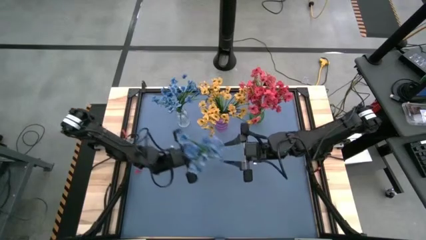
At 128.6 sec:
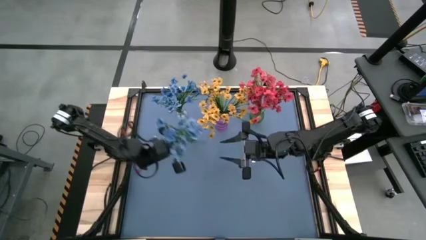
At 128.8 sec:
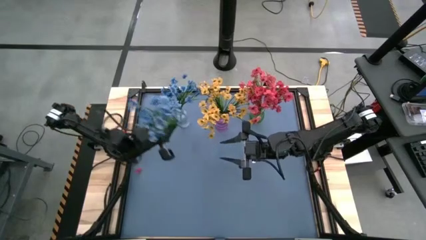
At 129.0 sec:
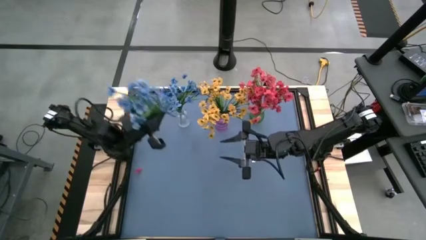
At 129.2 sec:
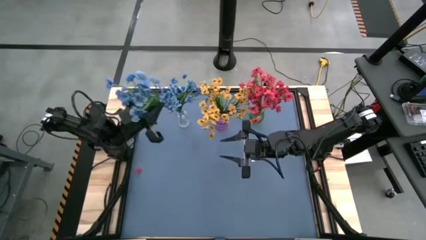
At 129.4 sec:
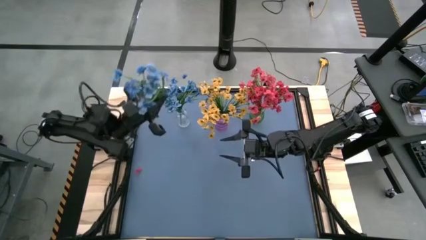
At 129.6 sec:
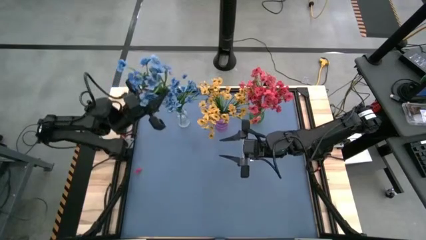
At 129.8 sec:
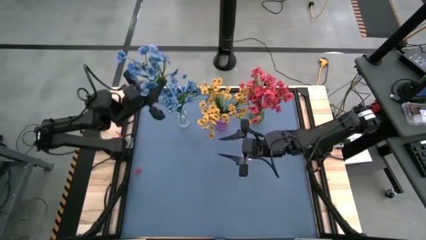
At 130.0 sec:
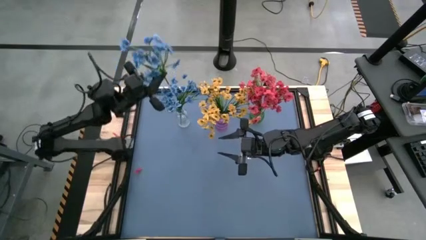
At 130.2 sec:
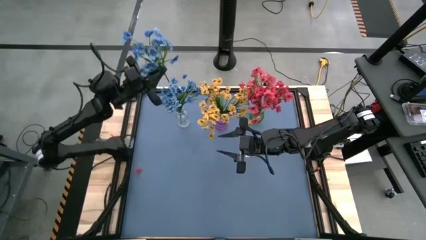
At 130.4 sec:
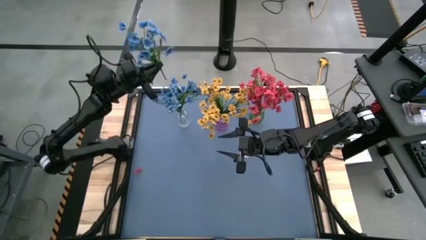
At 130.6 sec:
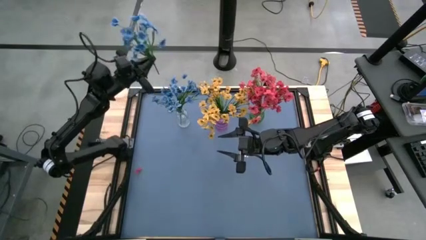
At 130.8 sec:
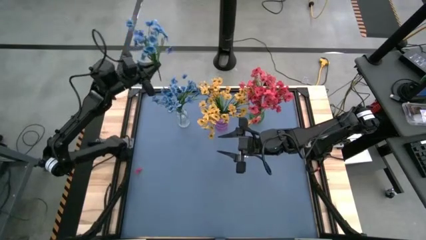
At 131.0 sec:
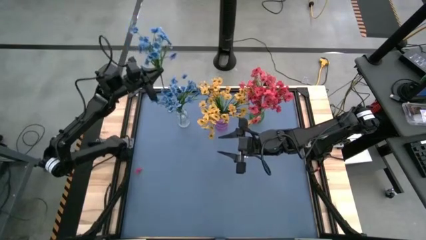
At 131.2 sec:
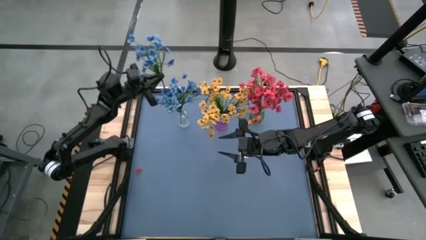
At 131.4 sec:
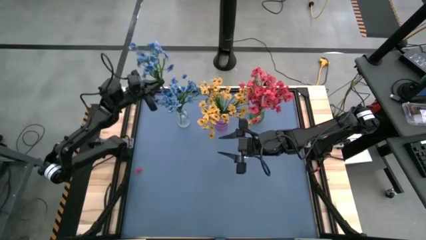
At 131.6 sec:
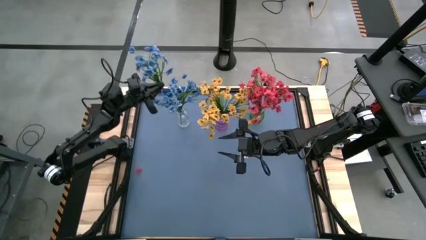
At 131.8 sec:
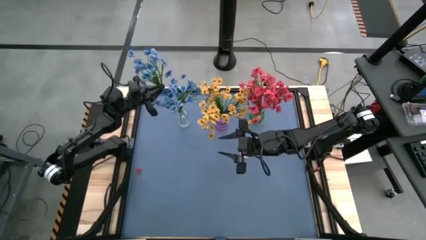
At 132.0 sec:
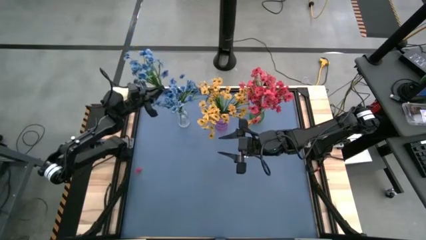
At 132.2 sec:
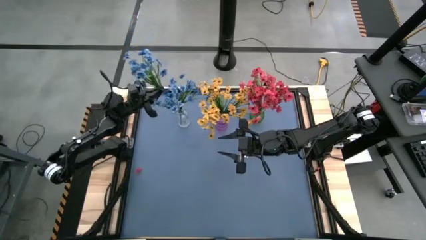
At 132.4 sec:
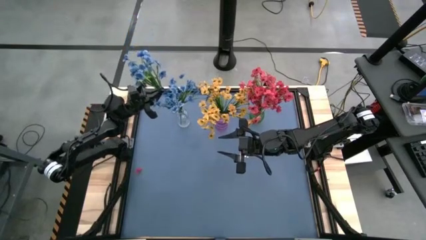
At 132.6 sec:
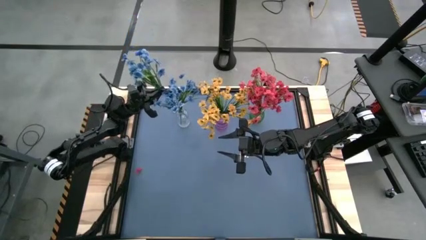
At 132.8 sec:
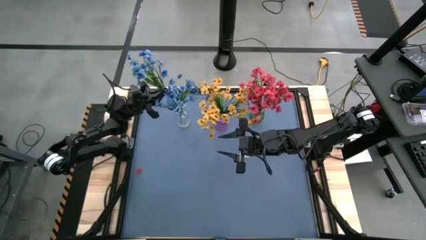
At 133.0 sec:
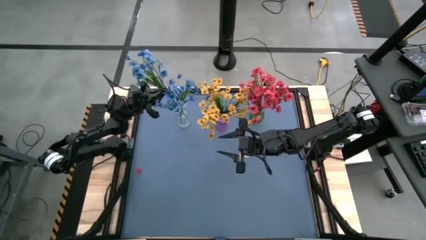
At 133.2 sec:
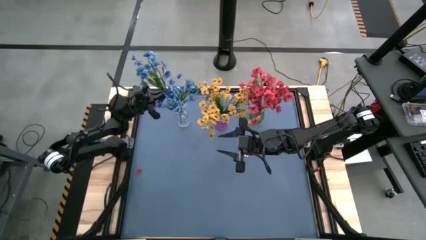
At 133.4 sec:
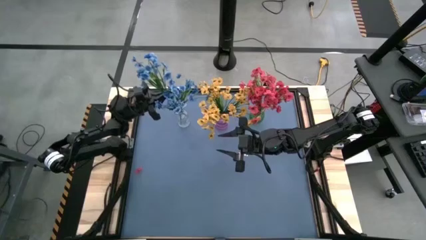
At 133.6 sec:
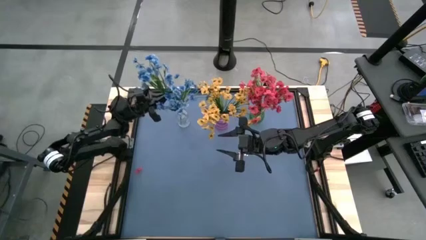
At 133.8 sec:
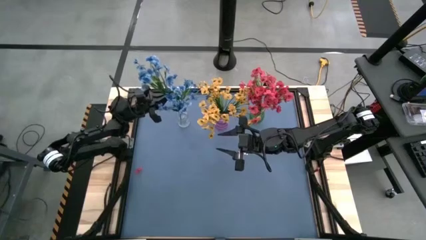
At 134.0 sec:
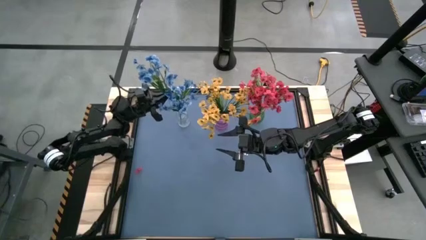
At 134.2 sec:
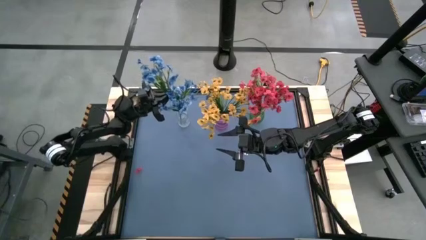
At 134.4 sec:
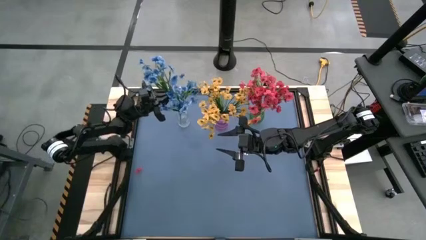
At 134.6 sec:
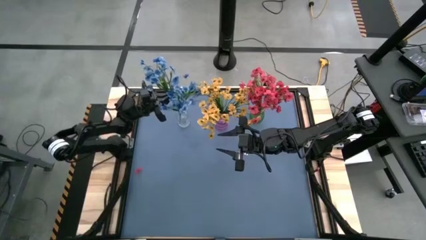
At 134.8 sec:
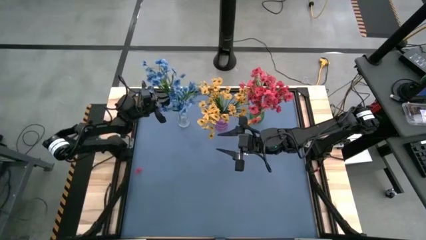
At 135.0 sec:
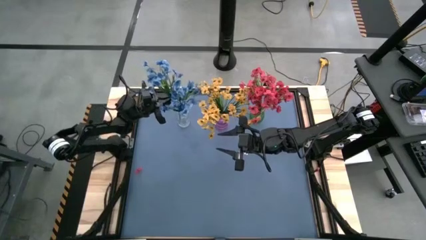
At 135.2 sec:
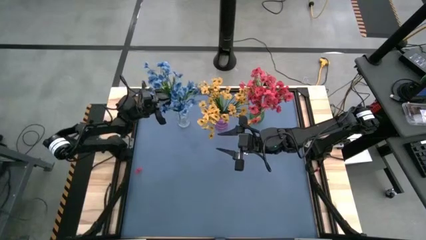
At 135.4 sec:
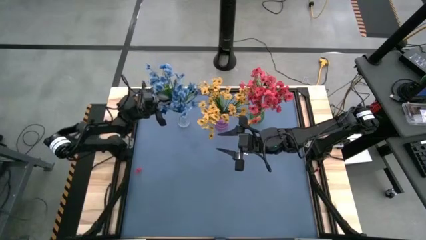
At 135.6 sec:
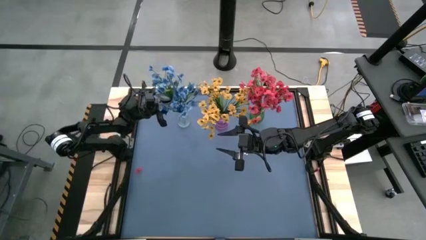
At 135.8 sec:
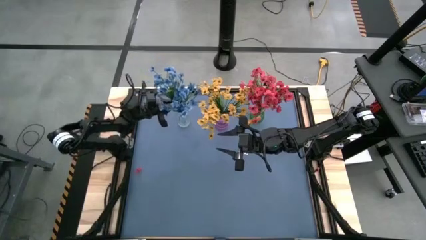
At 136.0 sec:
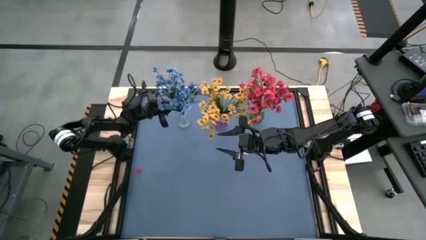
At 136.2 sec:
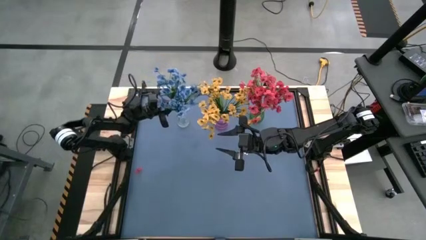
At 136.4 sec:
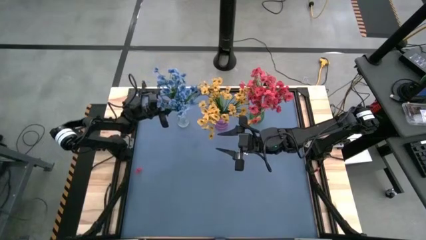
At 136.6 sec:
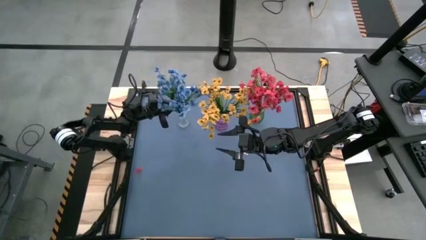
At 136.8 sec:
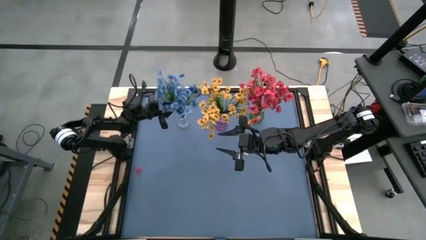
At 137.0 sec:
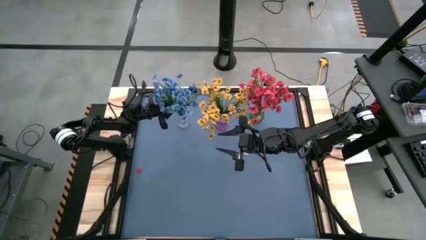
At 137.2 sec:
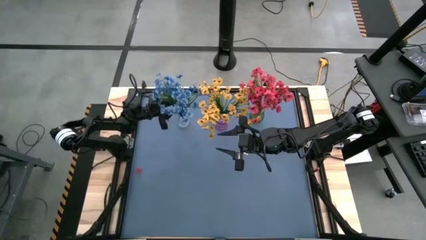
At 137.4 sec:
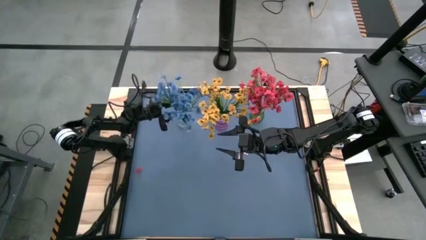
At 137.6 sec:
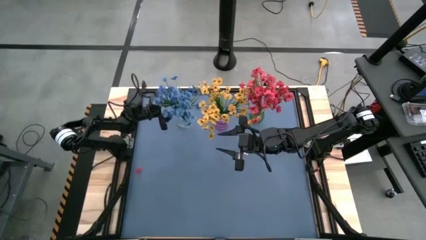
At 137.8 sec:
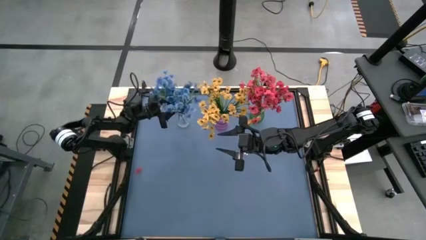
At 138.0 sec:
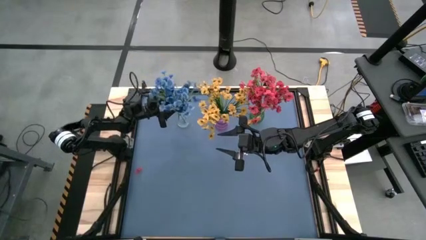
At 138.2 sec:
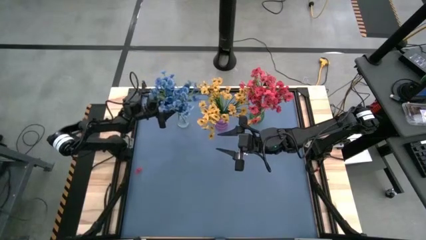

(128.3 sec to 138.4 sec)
Task: Sort flowers into vase by color
Put the blue flowers into the transparent vase

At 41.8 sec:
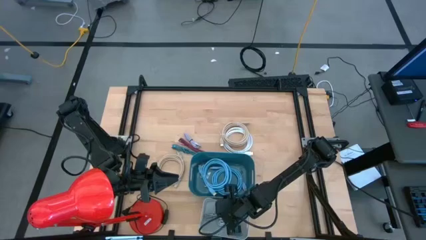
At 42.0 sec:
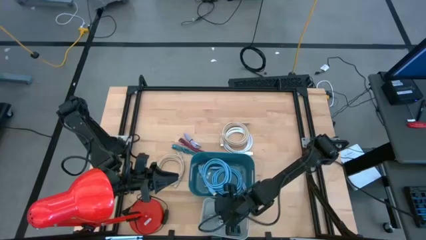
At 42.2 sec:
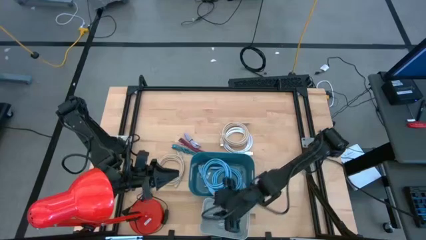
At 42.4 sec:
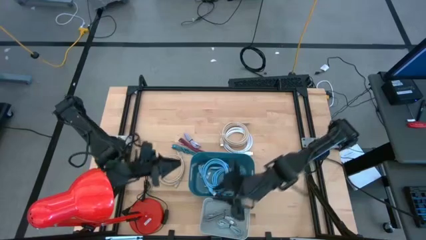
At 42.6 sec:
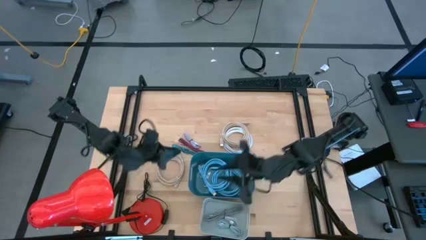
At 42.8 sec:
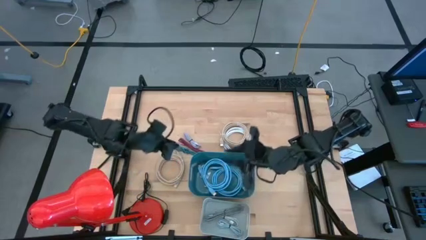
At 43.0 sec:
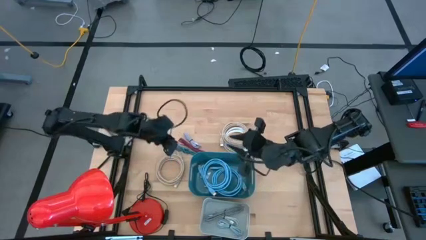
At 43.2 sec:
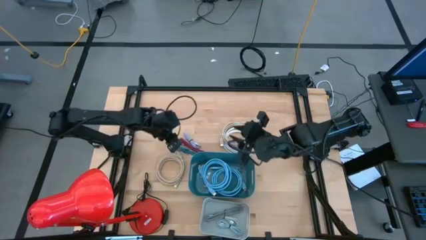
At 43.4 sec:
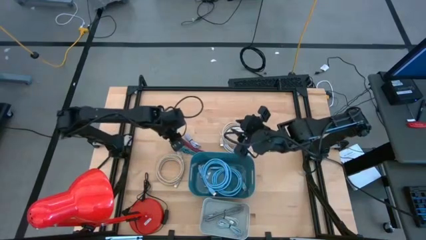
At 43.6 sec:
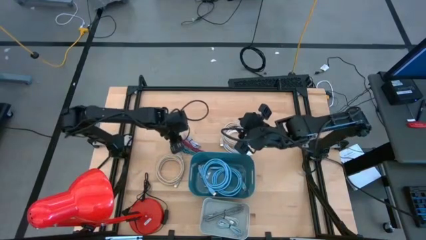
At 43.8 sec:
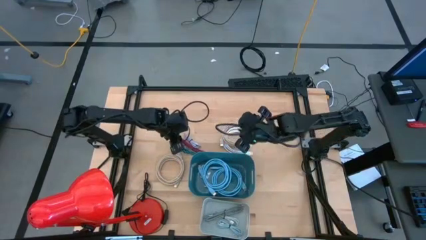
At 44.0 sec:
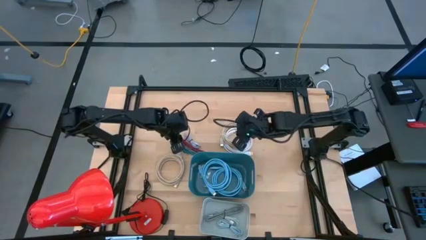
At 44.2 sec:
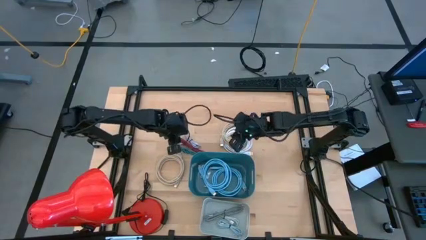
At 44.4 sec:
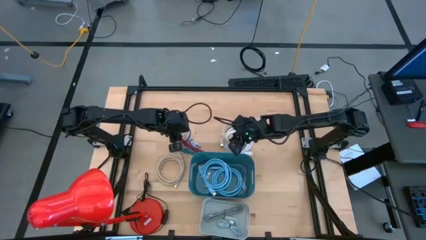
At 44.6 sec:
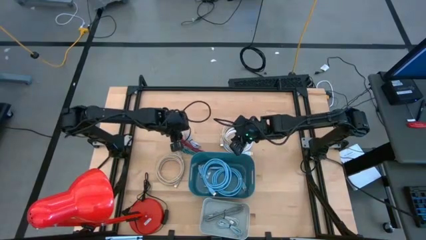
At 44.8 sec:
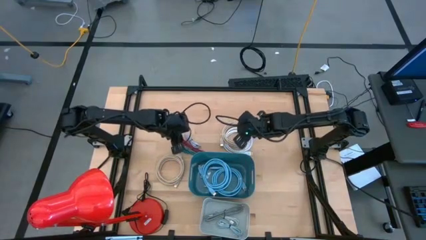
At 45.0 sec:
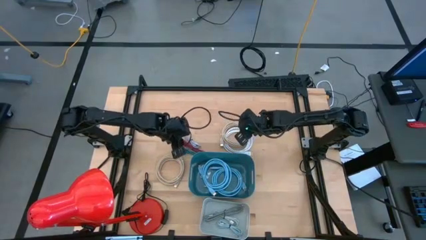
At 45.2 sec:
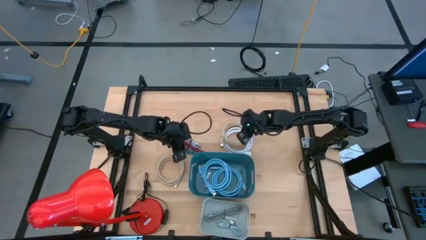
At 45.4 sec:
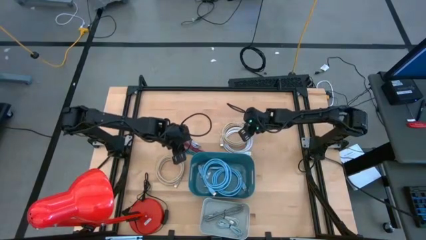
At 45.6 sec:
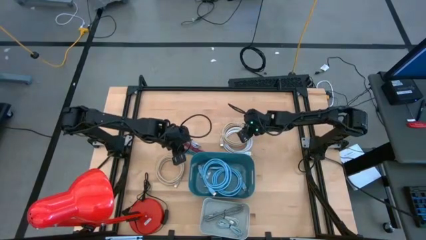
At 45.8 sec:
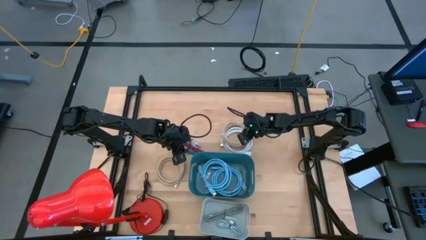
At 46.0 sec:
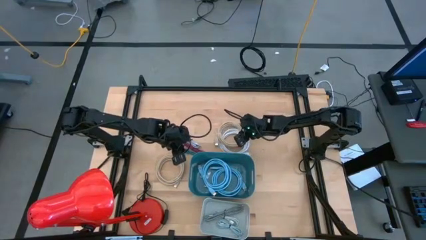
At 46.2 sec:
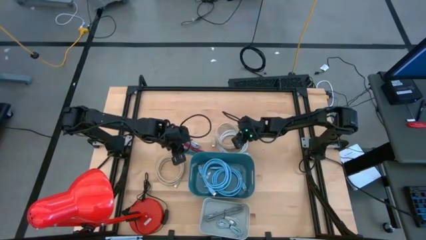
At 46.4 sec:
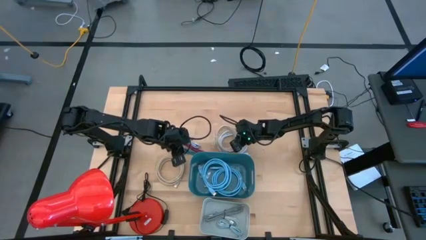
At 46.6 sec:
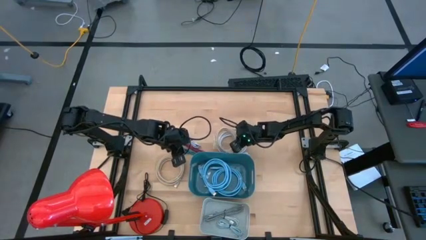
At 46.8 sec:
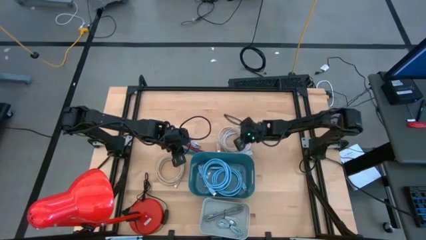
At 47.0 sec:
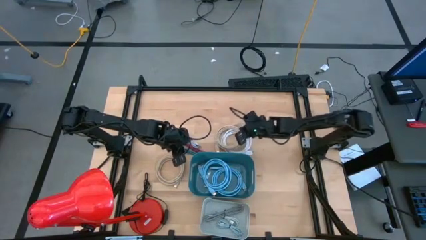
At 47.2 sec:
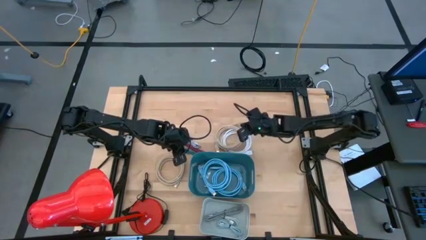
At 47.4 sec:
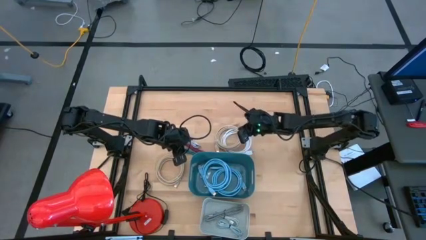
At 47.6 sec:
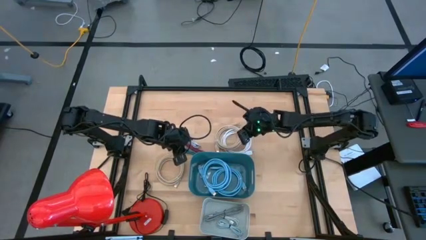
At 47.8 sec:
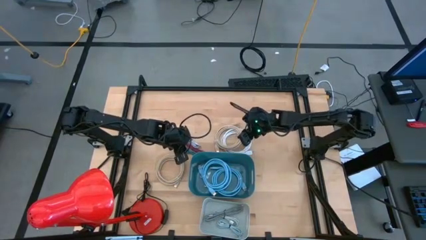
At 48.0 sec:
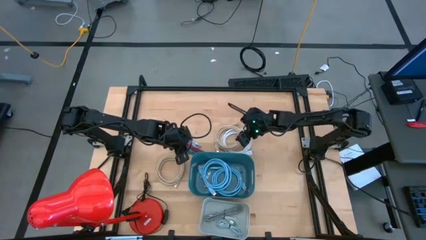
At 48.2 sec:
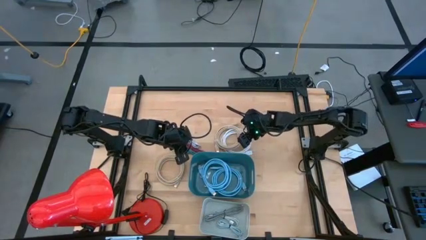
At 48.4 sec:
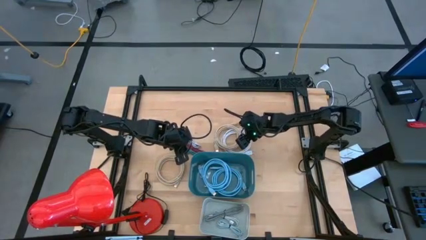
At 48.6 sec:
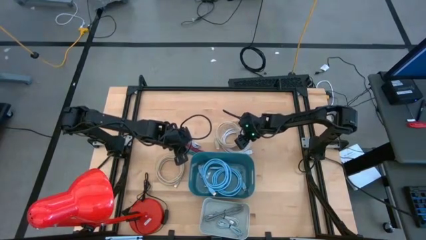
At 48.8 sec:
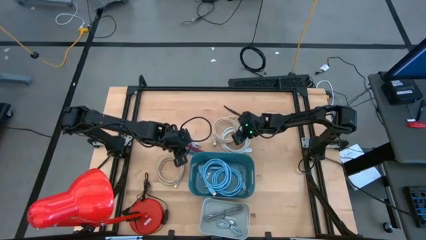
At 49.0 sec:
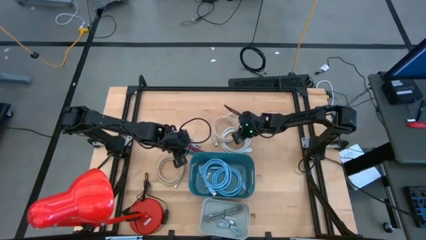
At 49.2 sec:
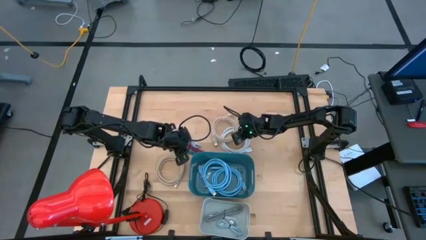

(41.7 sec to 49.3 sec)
Task: Pick & Place USB Port
Put the top brown HDMI cable into the blue bin
